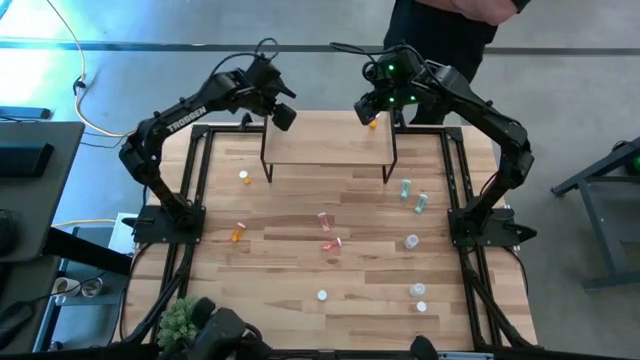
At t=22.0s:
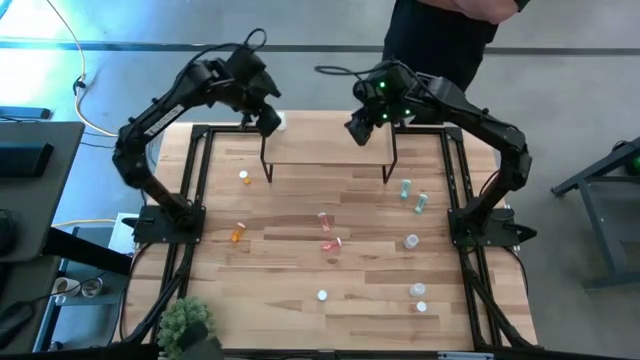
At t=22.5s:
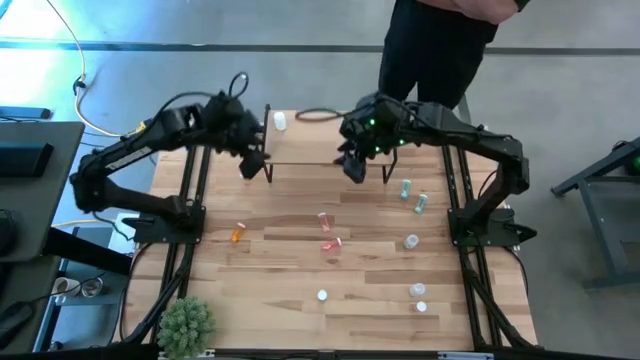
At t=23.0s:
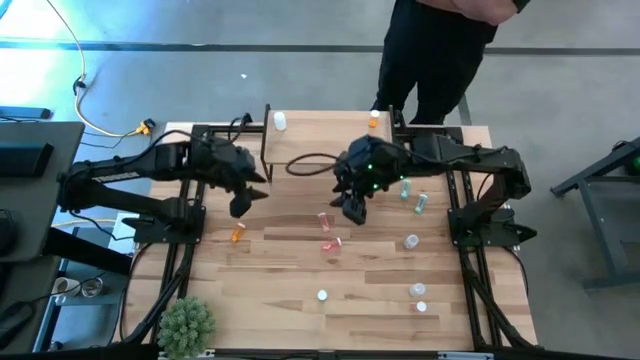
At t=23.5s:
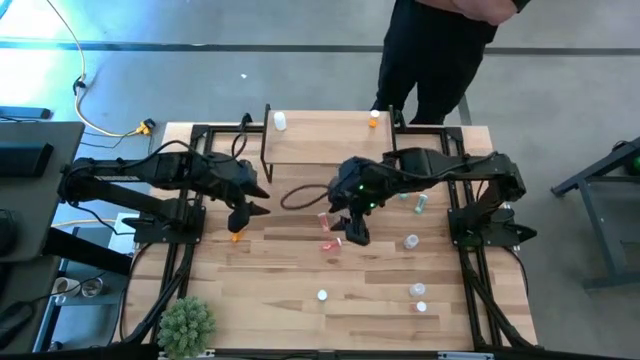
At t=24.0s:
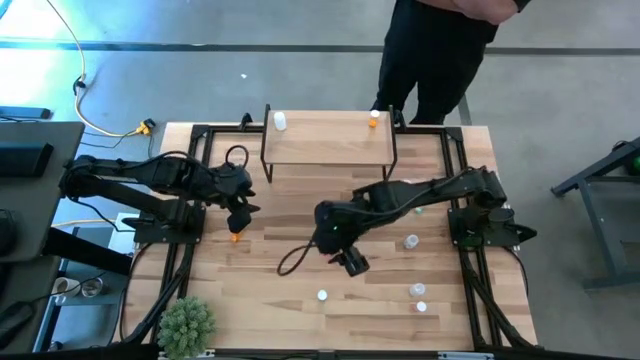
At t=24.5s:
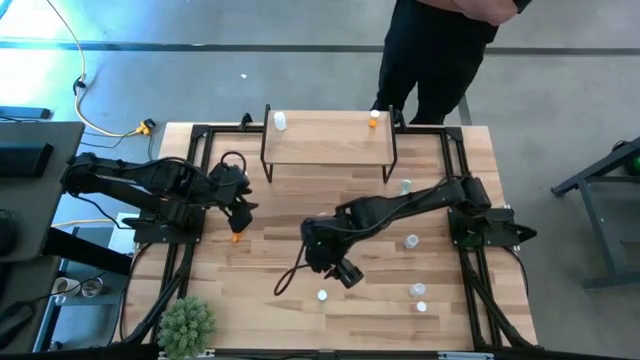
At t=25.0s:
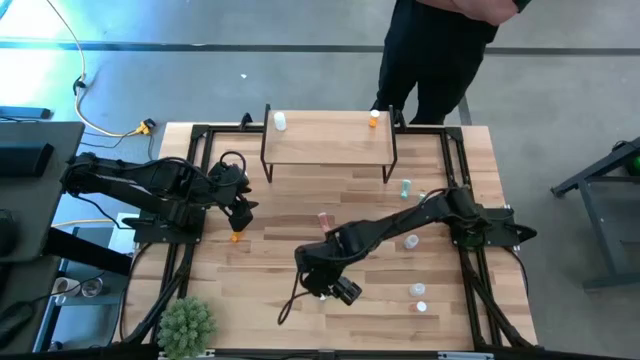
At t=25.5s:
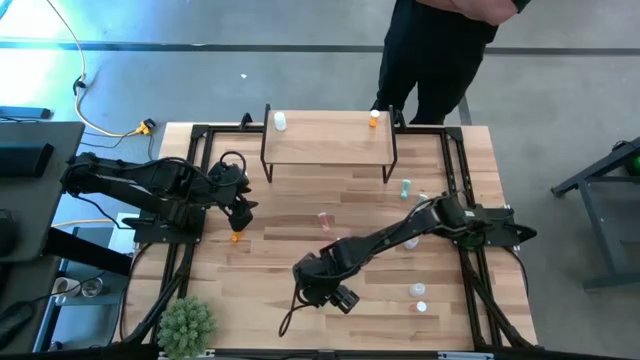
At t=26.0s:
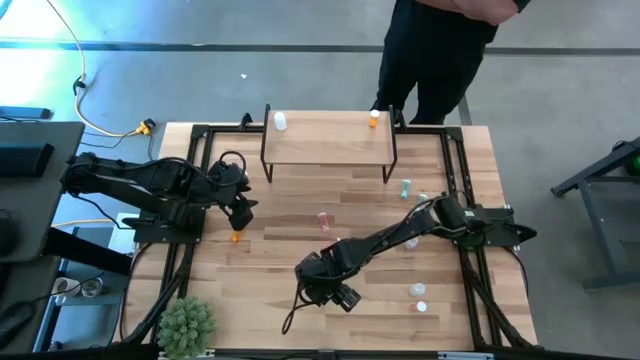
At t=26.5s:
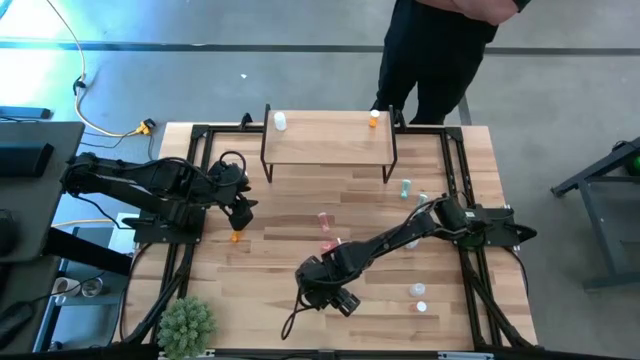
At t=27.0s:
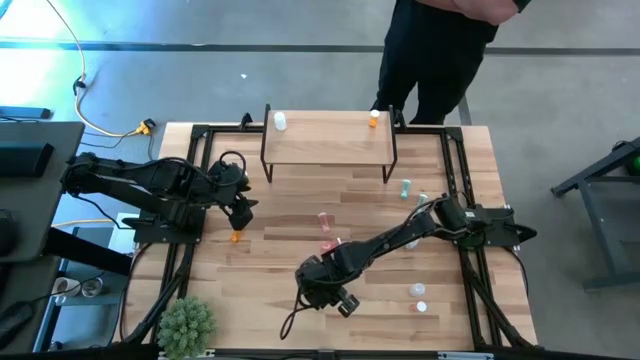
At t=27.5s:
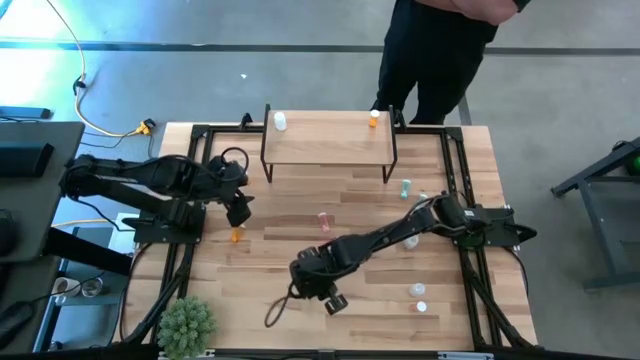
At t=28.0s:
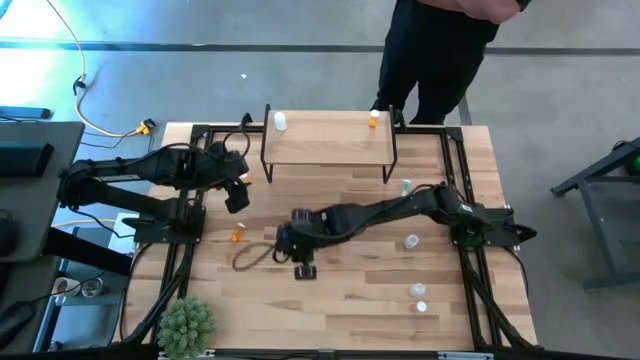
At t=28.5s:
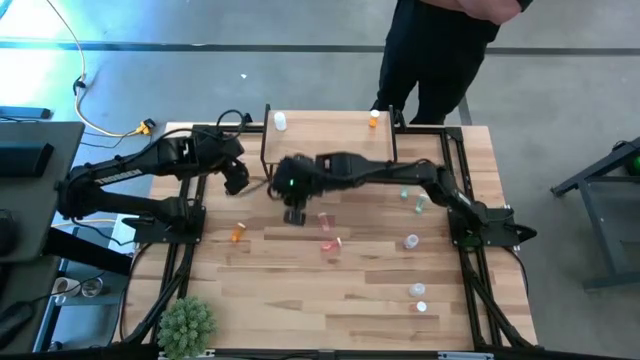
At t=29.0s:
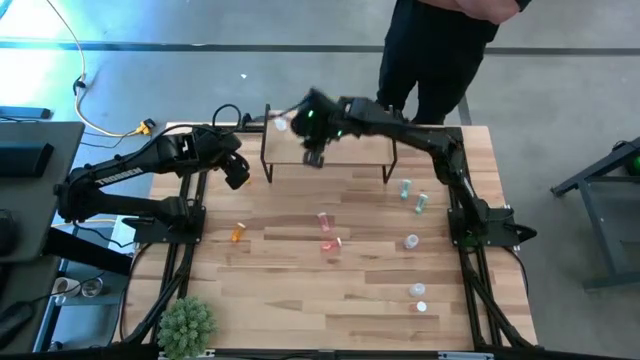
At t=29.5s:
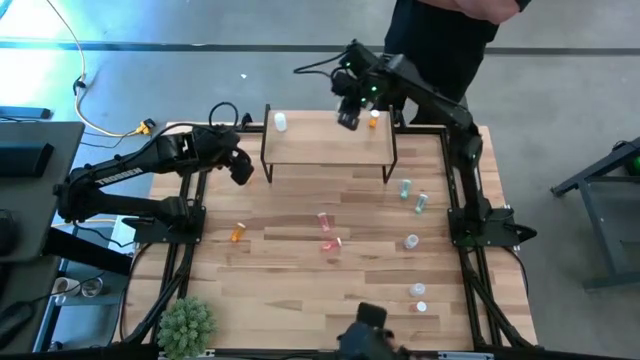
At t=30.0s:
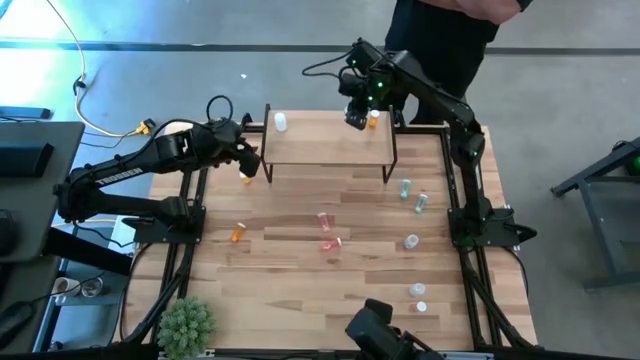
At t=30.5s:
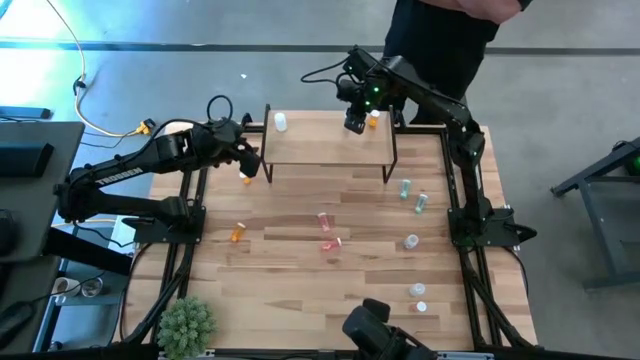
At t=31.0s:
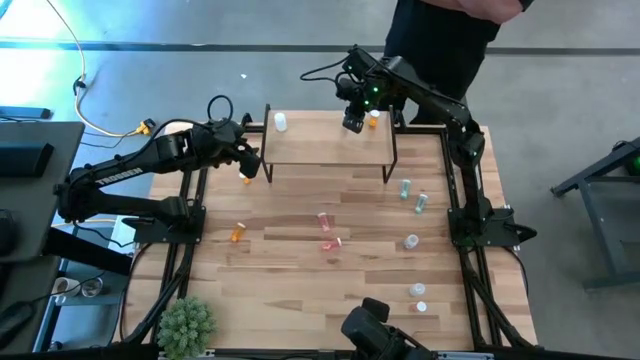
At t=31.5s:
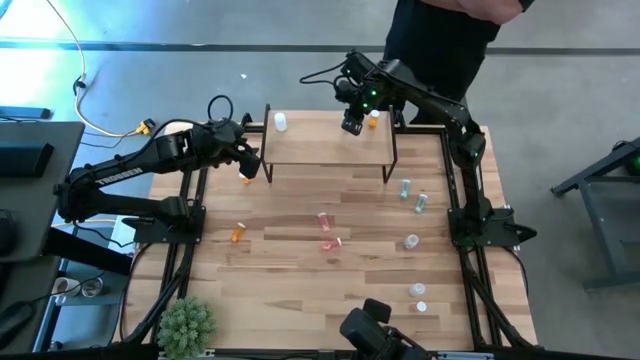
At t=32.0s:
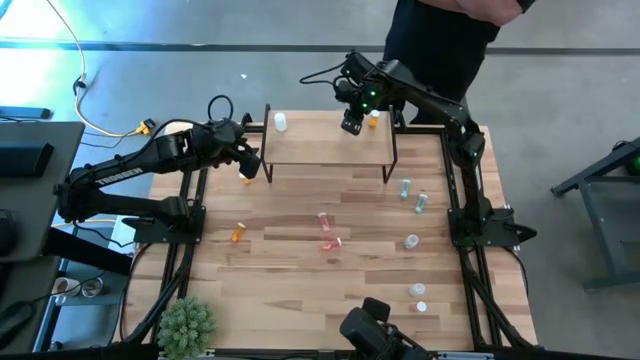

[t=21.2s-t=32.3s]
Task: Pick and place medicine bottles onto shelf by color
Put the bottom blue pill bottle on the shelf

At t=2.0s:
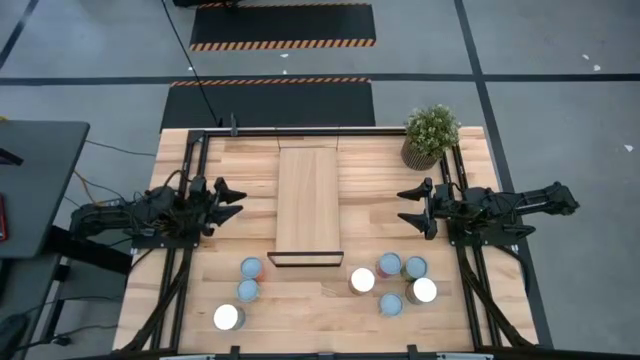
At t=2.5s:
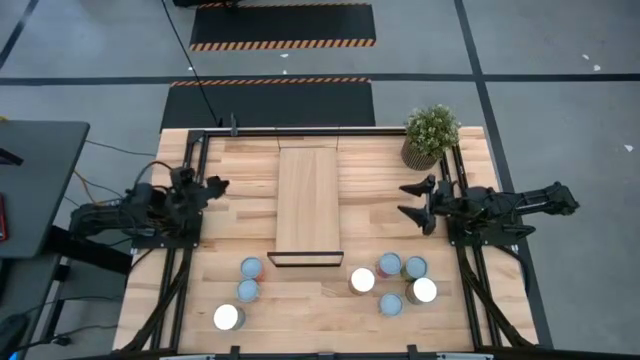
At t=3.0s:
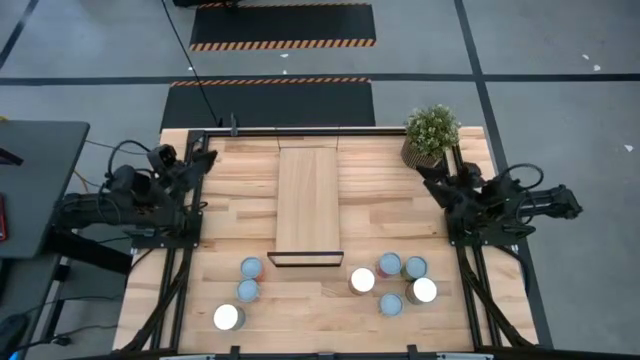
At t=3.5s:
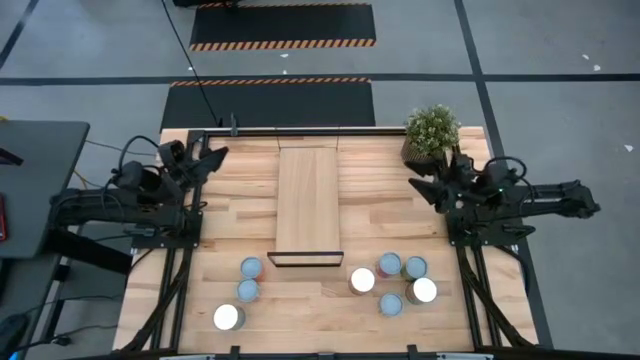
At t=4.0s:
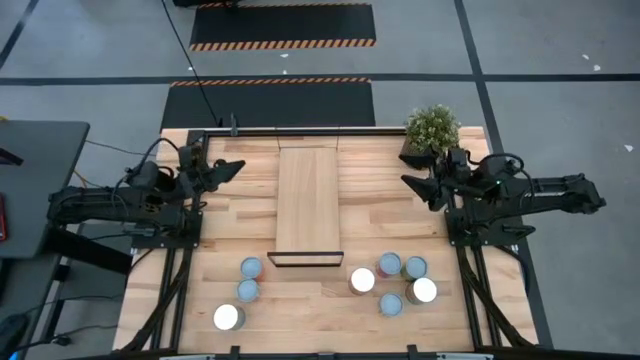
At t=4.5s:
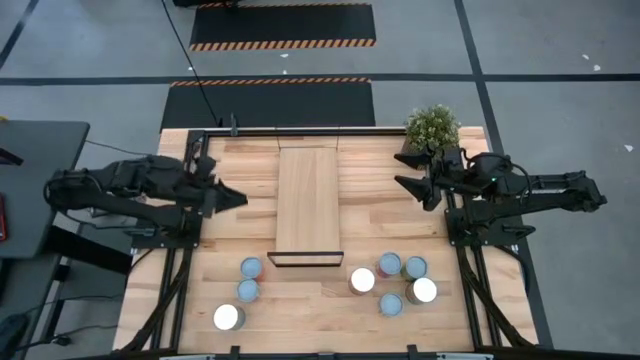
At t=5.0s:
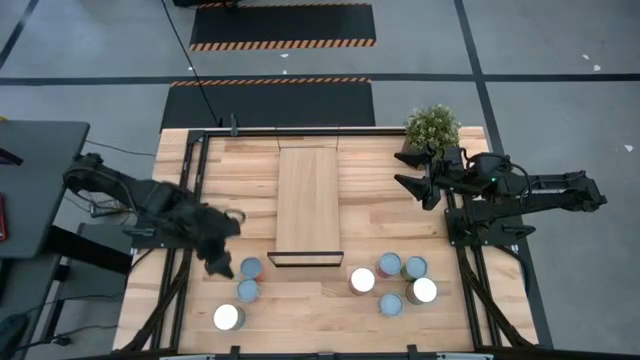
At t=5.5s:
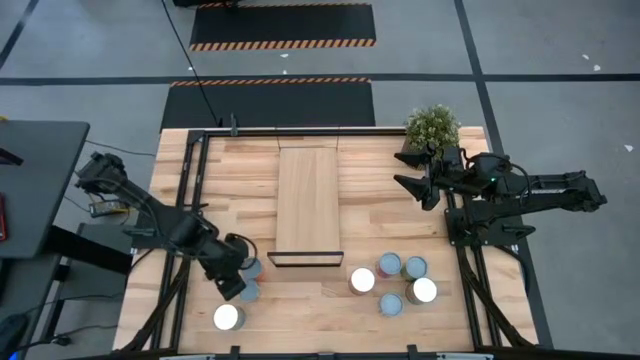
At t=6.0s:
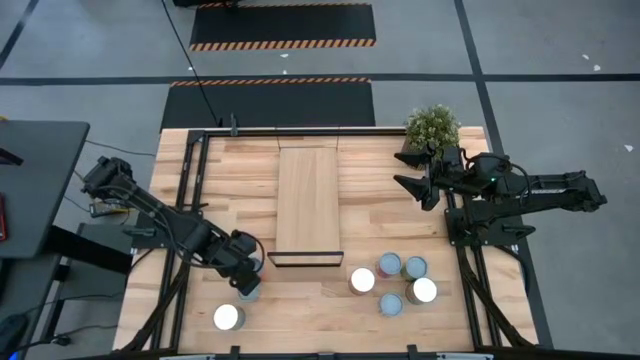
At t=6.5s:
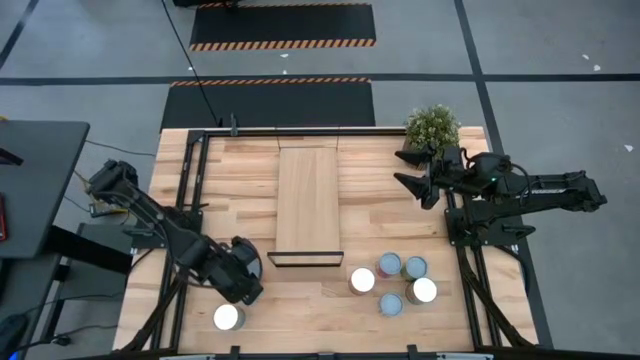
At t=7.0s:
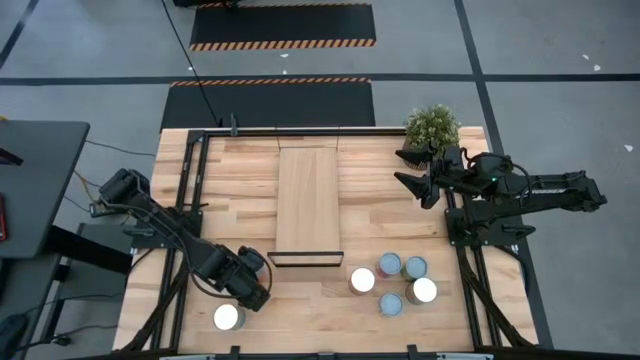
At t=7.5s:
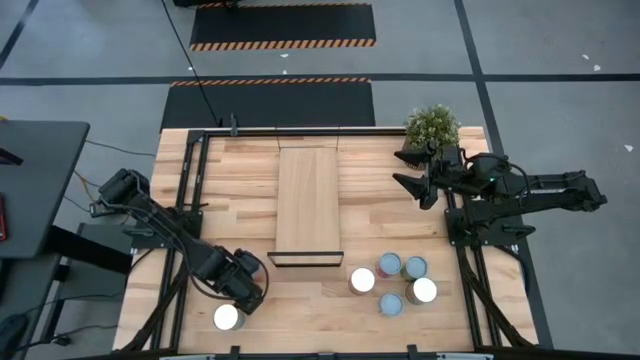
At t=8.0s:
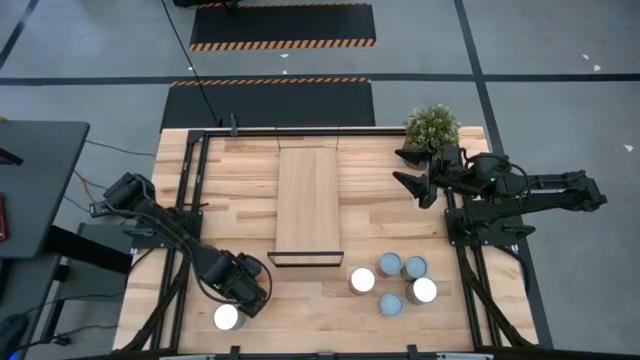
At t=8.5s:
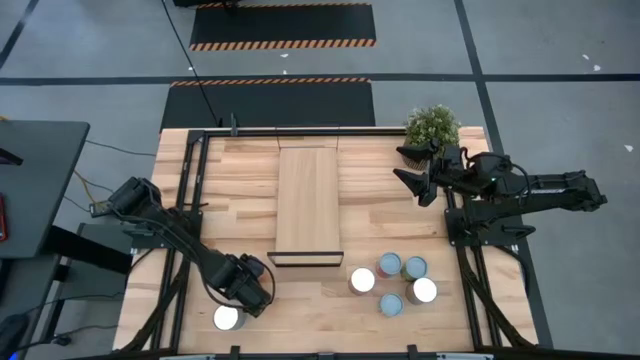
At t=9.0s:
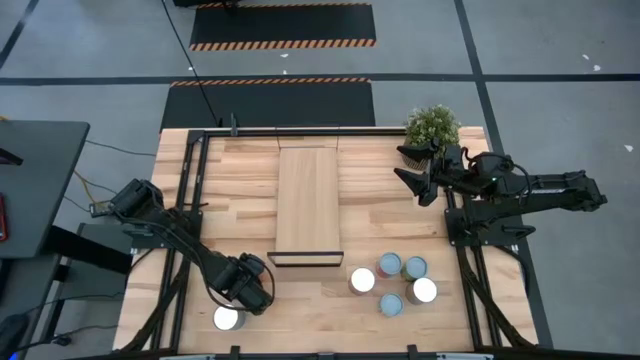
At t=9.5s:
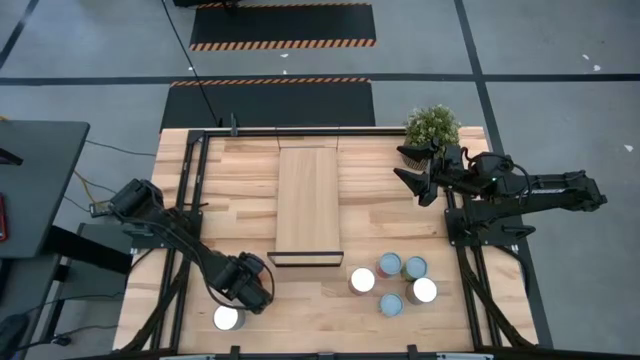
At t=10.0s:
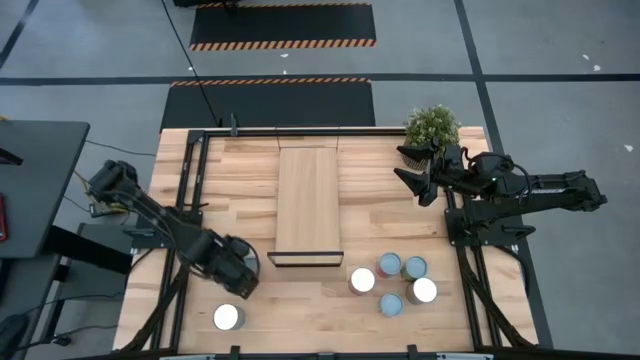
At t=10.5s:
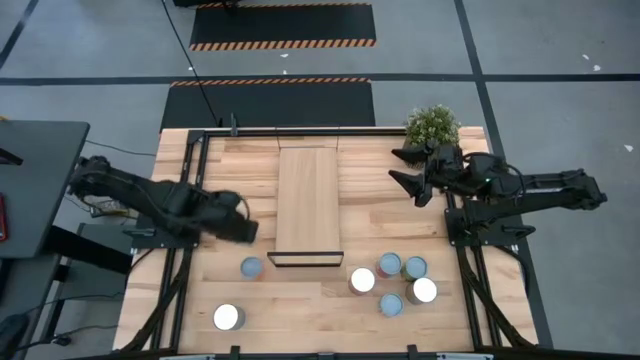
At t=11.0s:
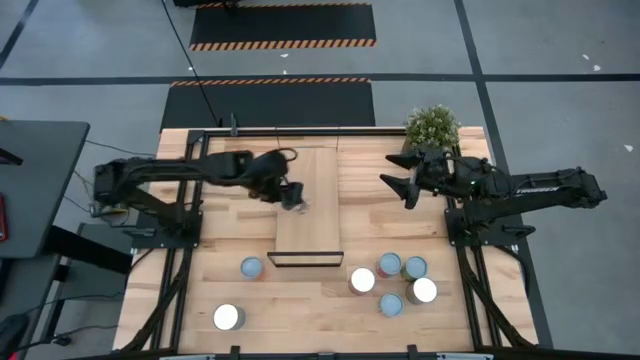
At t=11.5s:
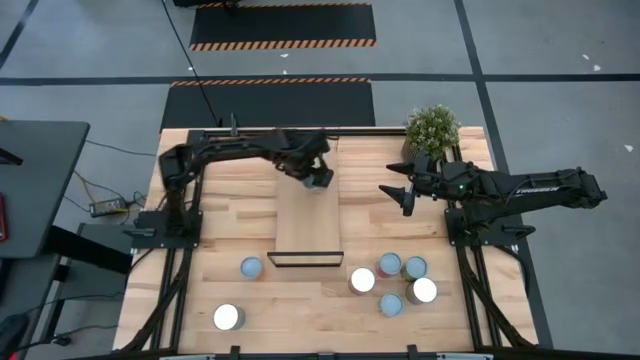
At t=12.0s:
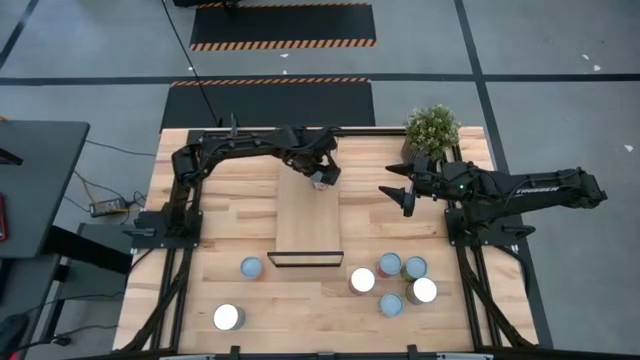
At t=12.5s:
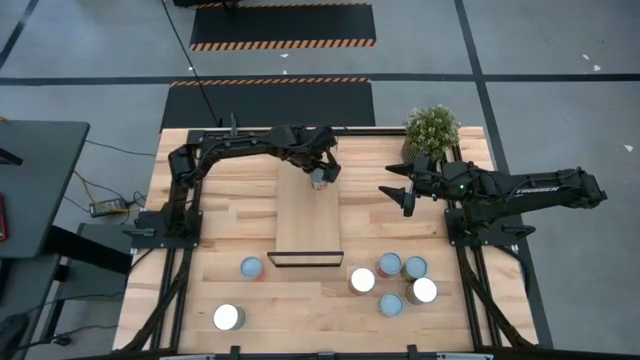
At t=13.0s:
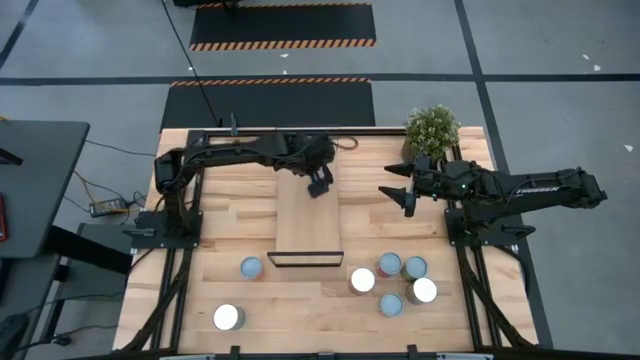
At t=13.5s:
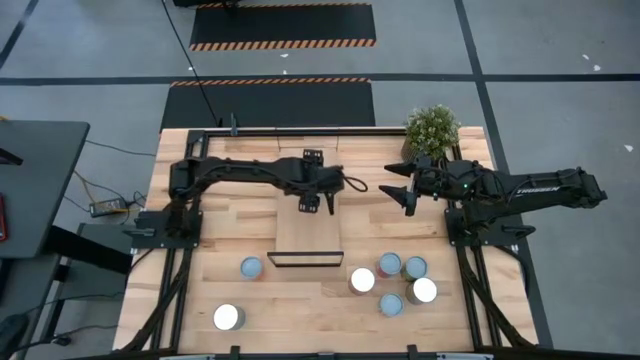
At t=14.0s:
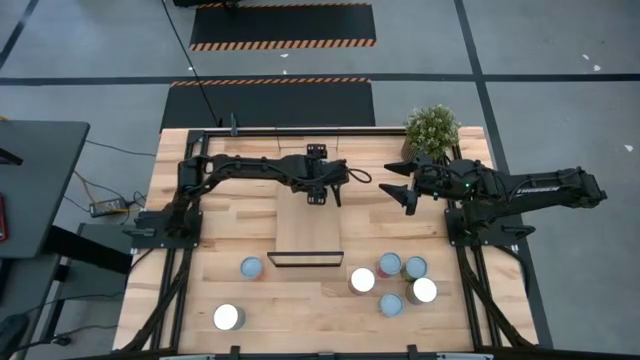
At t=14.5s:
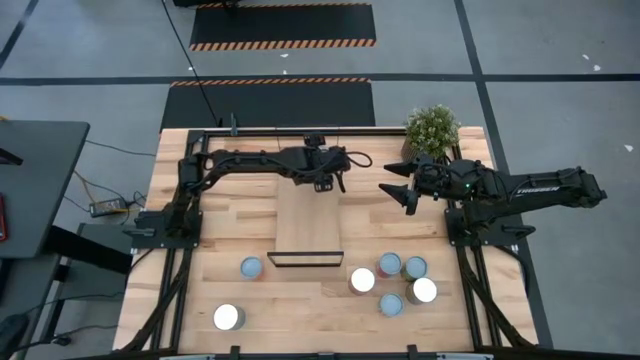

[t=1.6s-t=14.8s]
Task: Pick and place cans onto a shelf
Put the red can on the shelf
